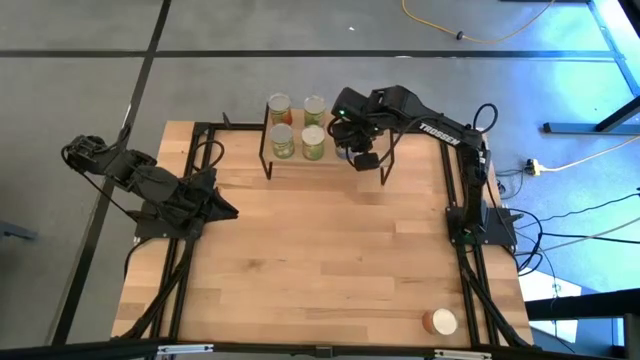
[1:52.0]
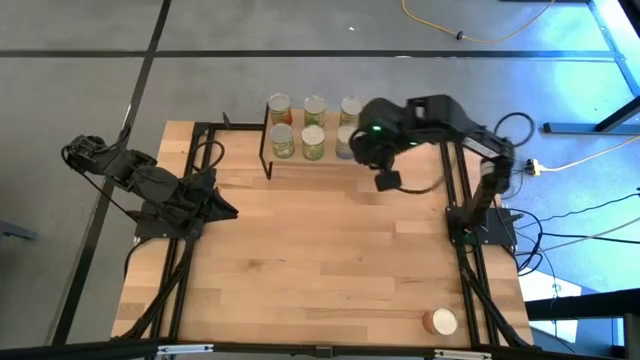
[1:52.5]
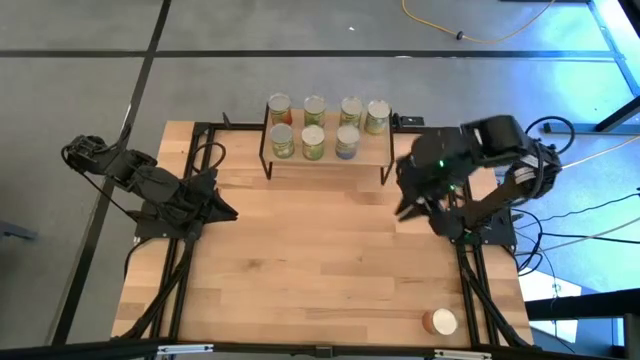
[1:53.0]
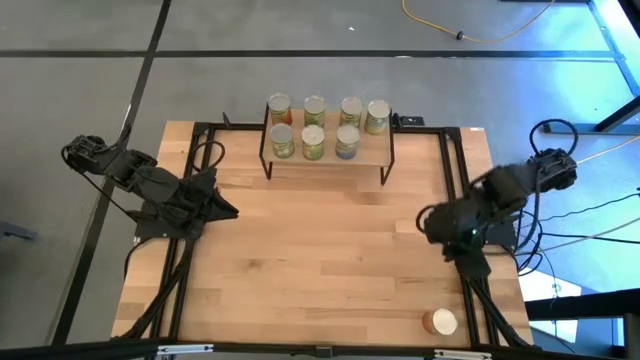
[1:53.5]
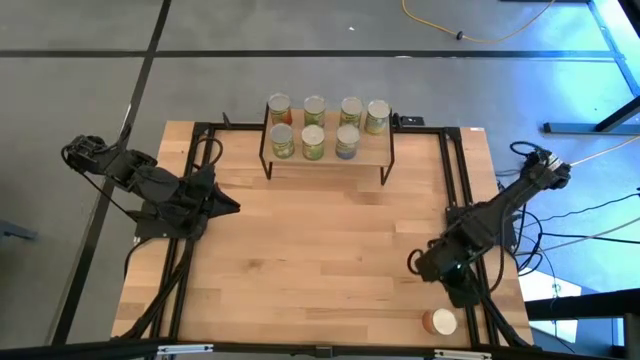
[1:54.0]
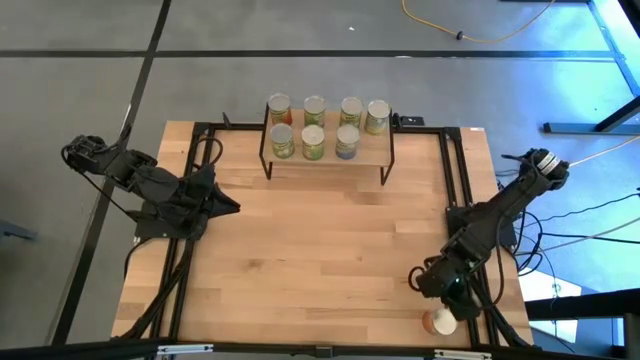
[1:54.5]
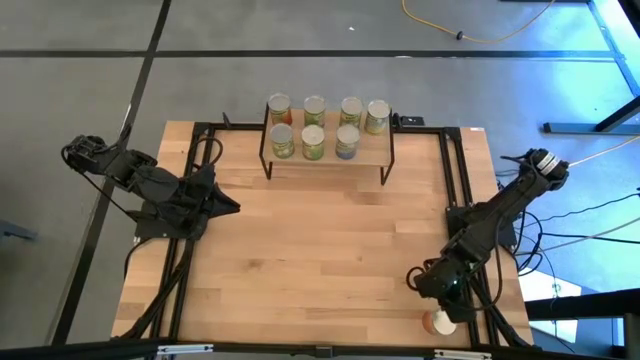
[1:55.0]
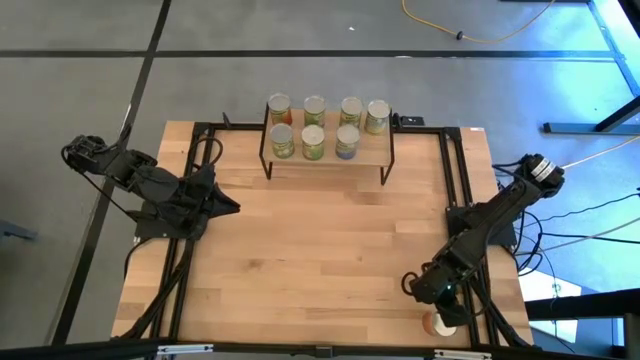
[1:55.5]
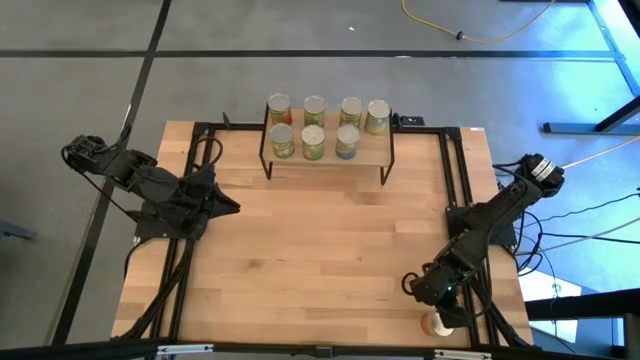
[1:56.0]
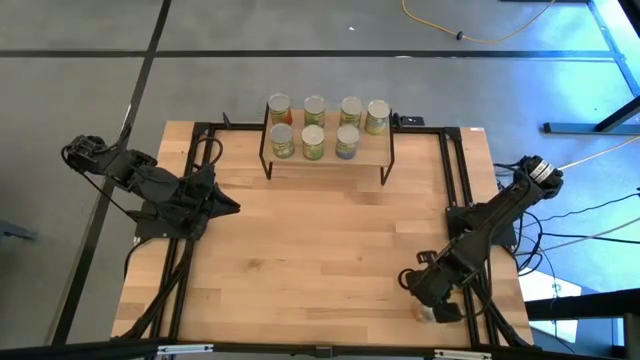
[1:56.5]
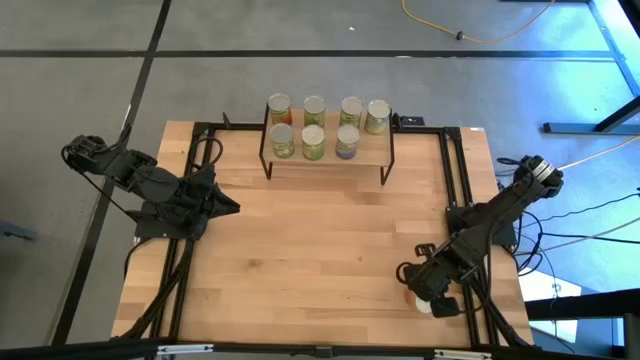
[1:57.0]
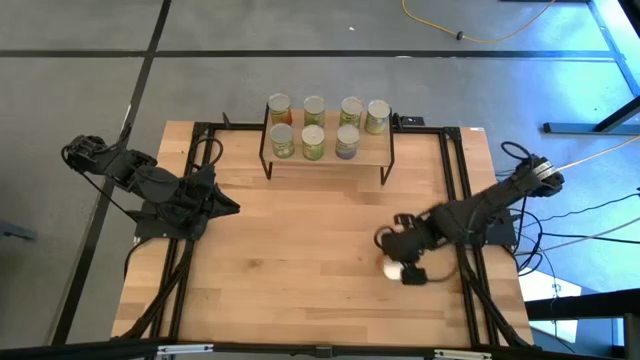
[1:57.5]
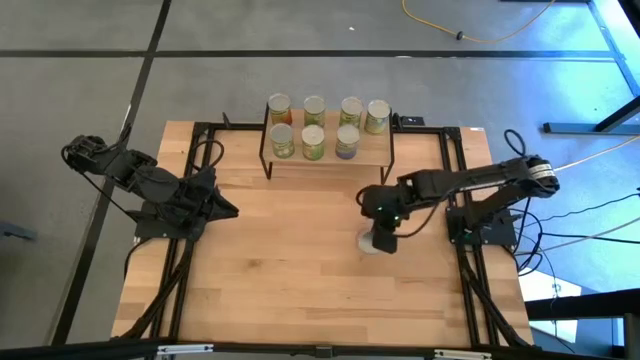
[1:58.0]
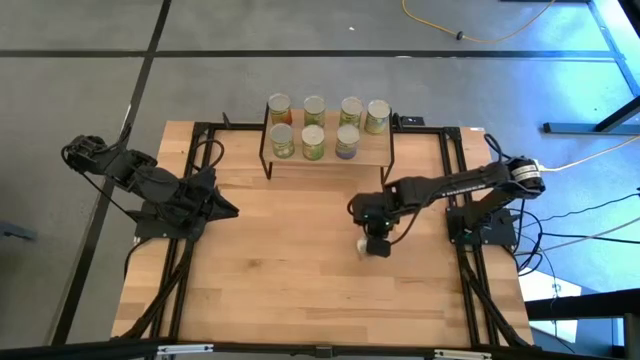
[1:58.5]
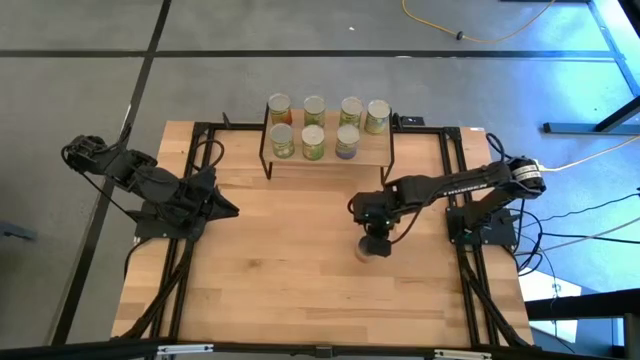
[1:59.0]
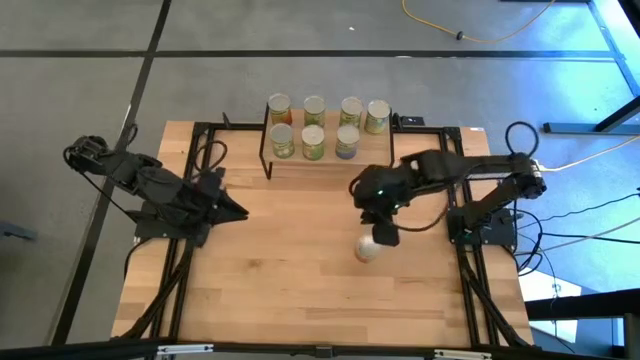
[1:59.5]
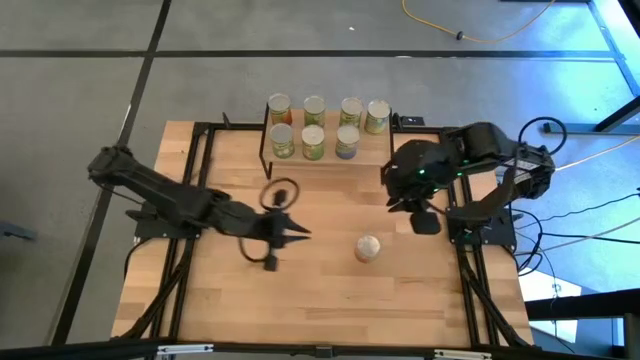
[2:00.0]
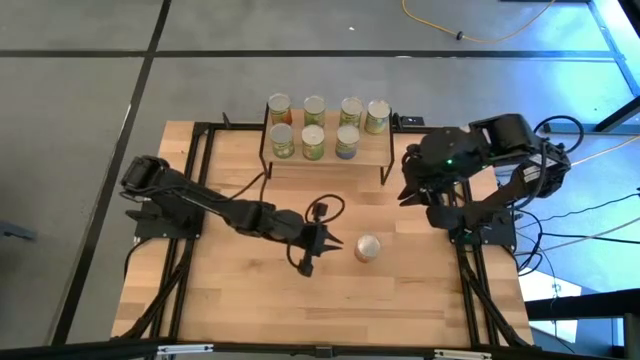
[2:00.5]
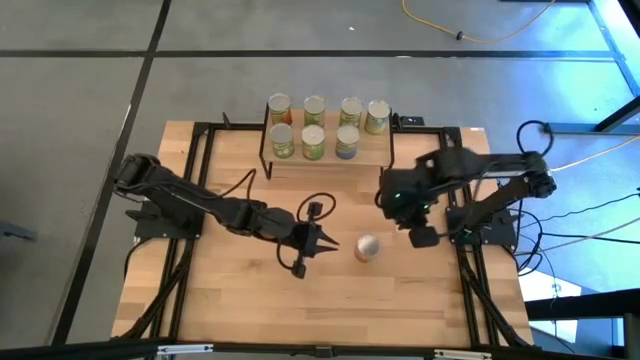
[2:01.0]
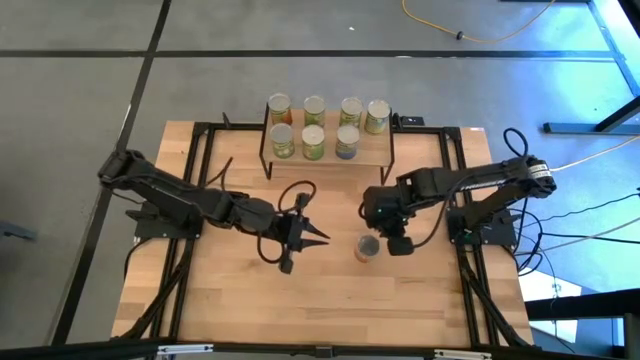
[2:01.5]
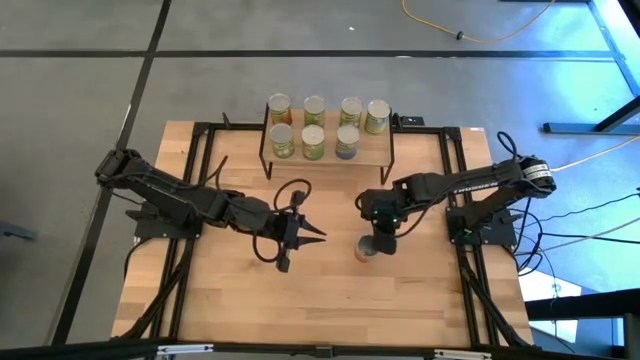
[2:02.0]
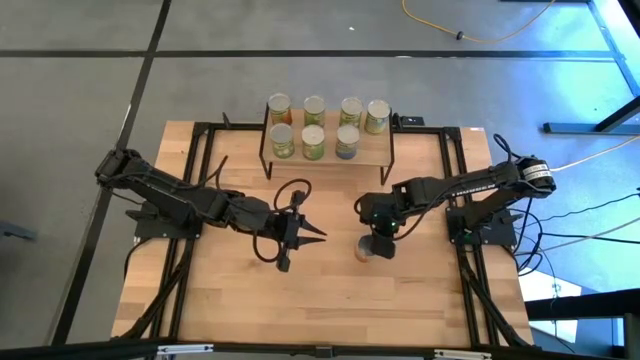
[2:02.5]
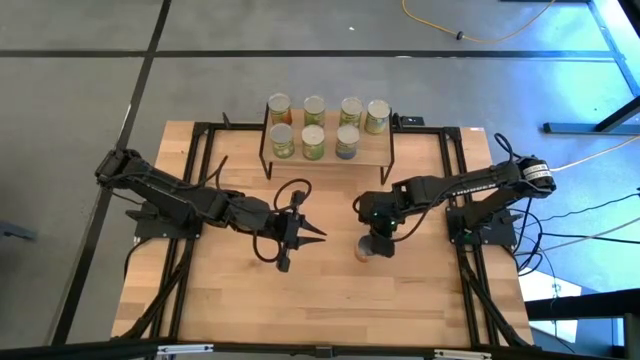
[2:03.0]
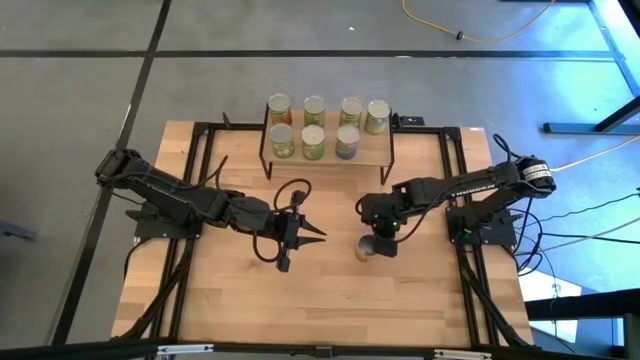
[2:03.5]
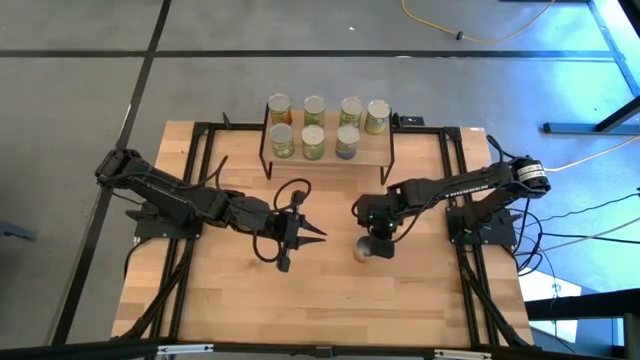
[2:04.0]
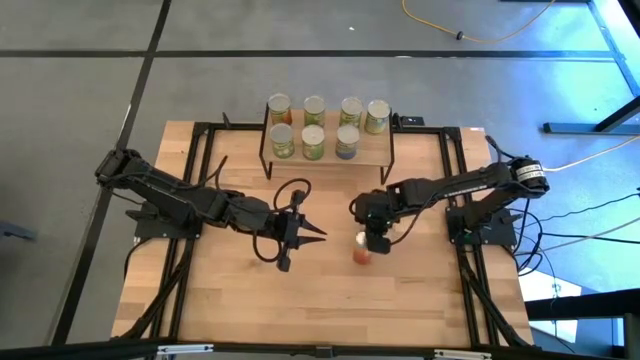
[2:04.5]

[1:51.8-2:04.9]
Task: Pick and place cans onto a shelf
Put the canned pineapples on the shelf

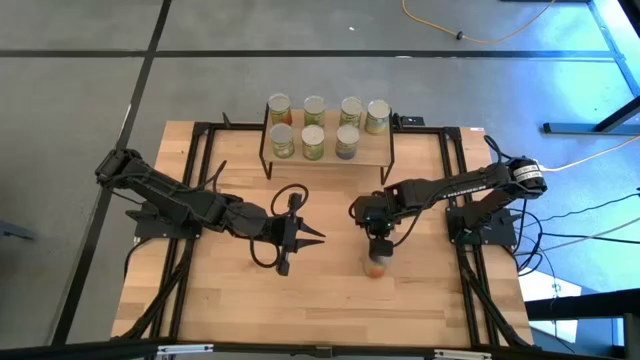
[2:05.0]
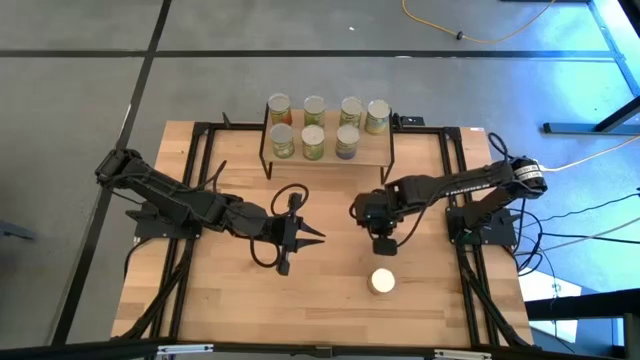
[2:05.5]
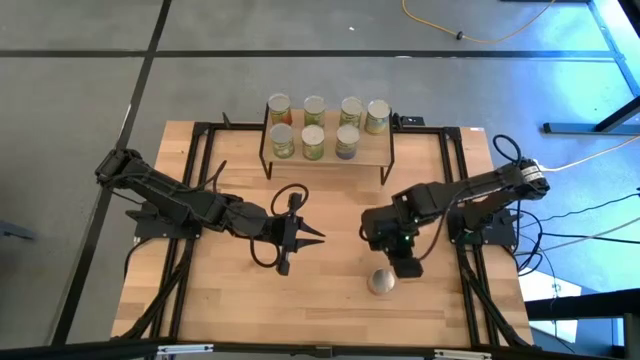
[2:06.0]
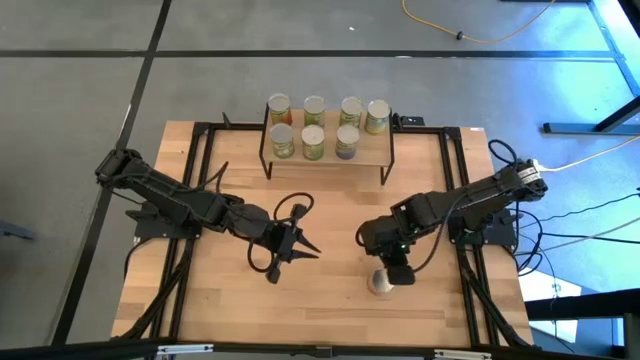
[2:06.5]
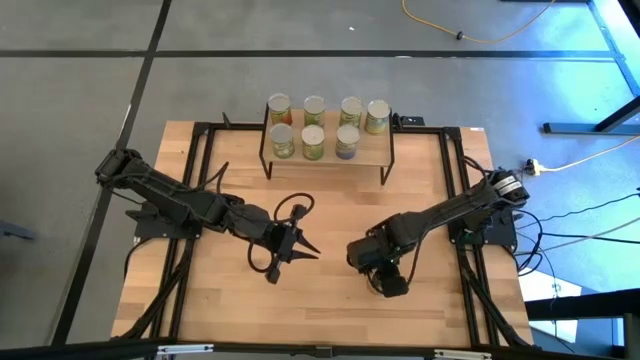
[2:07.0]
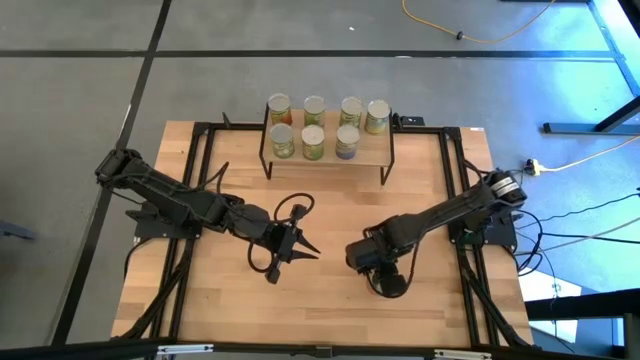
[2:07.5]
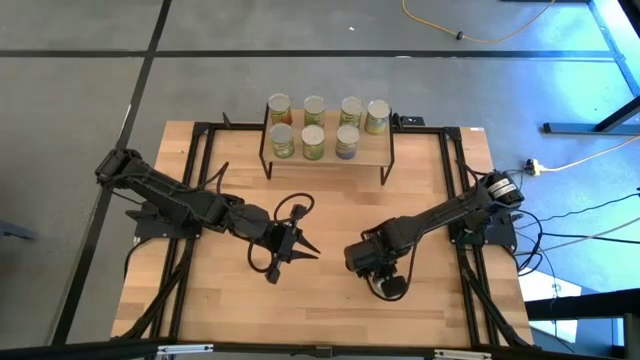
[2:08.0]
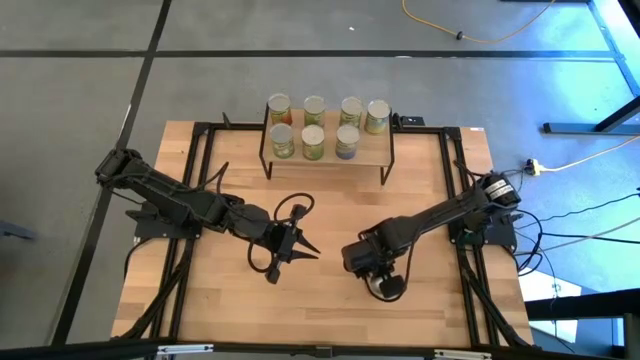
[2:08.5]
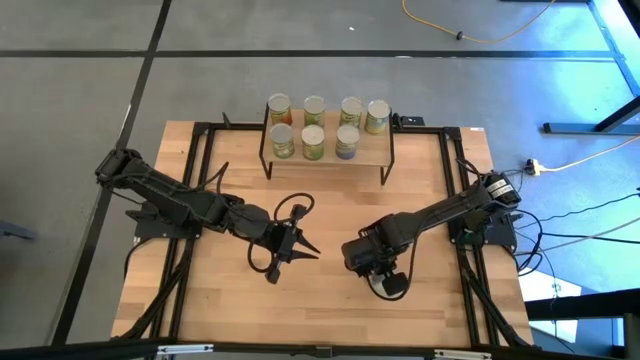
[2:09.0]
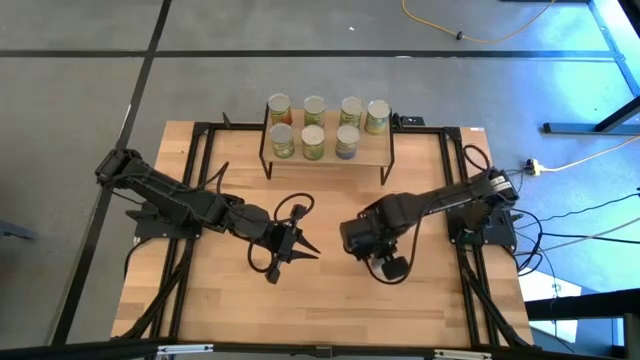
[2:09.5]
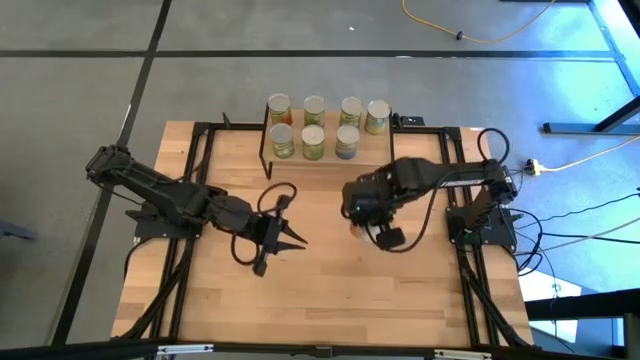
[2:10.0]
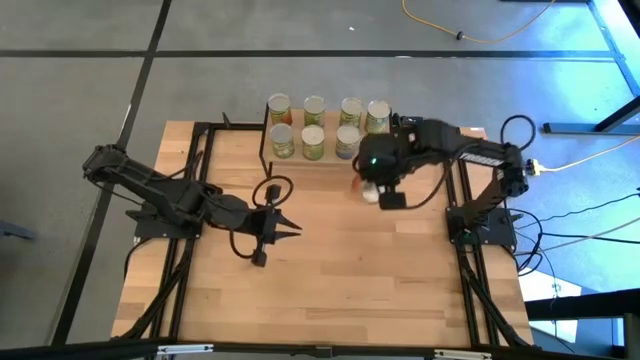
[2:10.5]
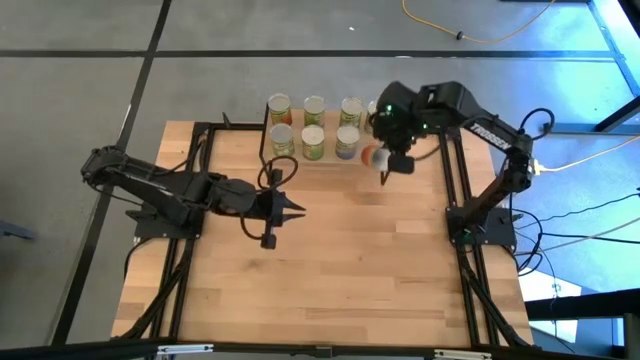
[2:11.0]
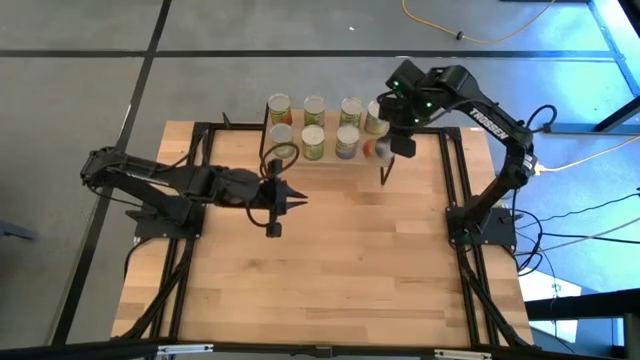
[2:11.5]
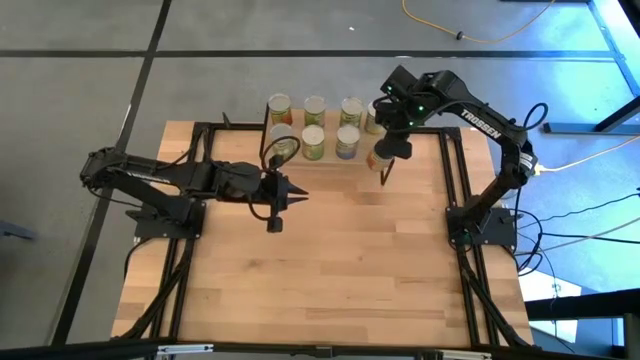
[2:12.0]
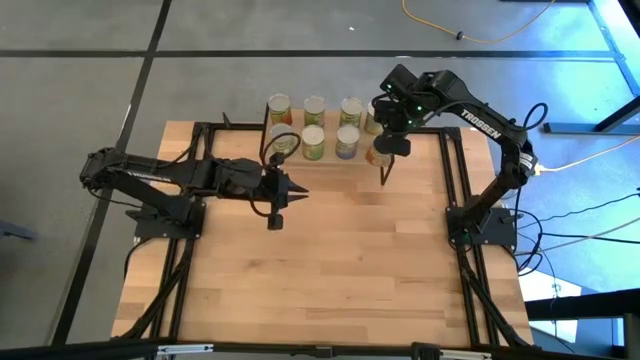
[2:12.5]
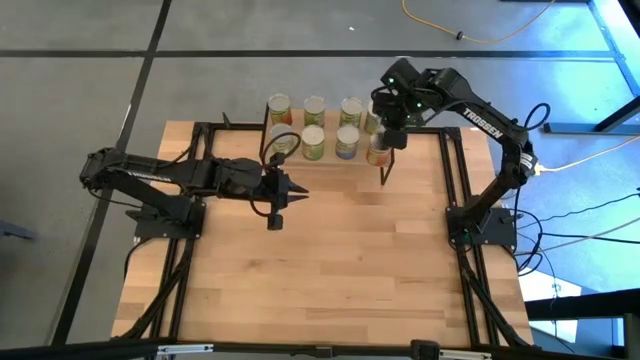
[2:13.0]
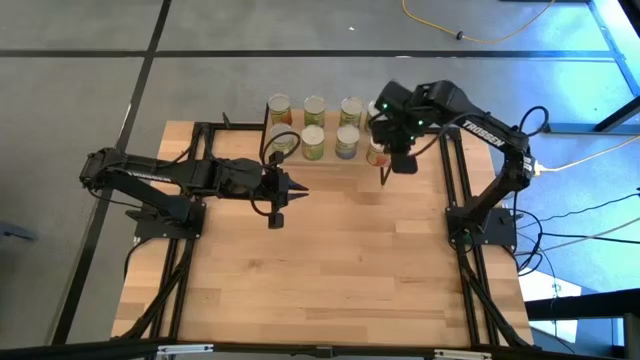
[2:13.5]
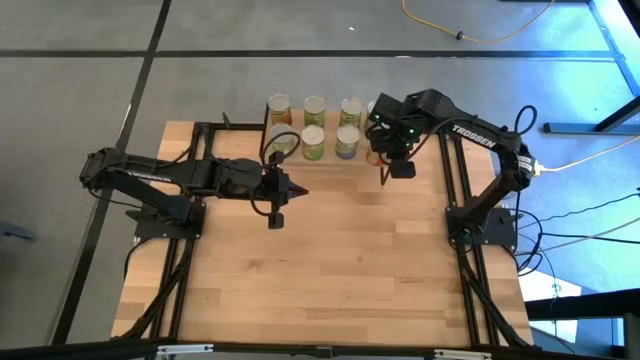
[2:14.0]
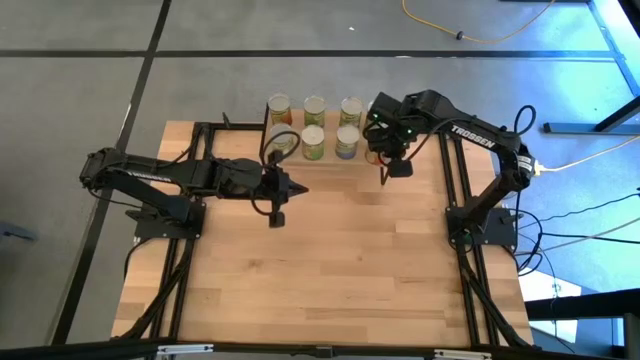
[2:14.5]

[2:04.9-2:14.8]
Put the canned pineapples on the shelf
